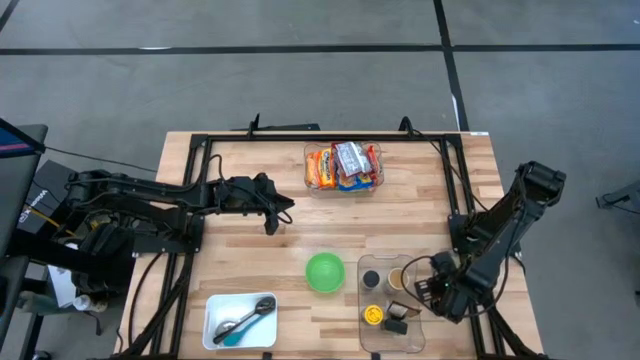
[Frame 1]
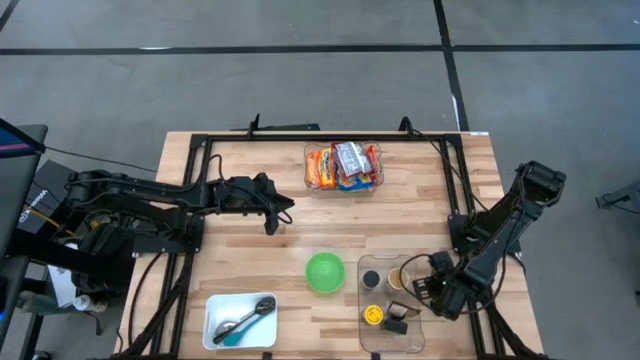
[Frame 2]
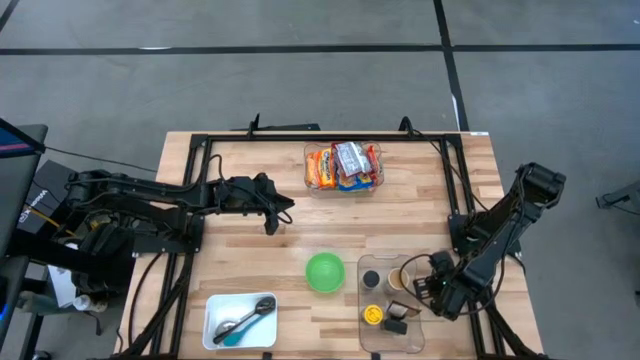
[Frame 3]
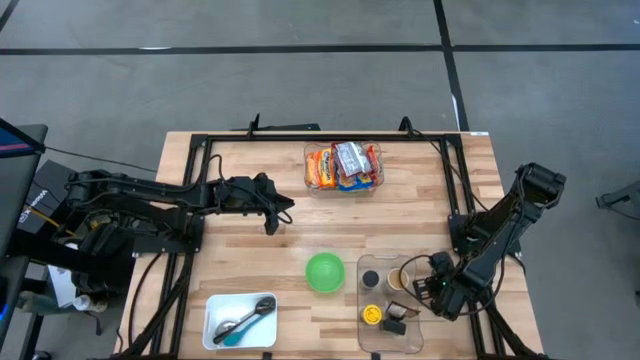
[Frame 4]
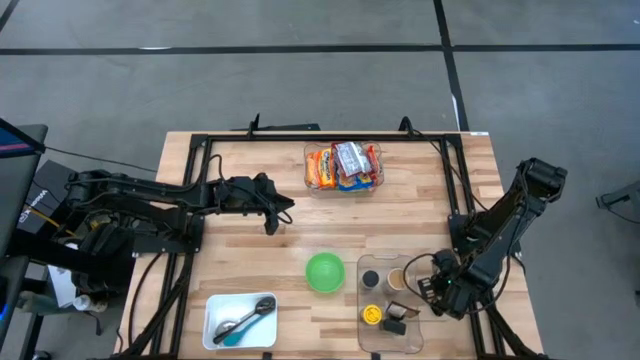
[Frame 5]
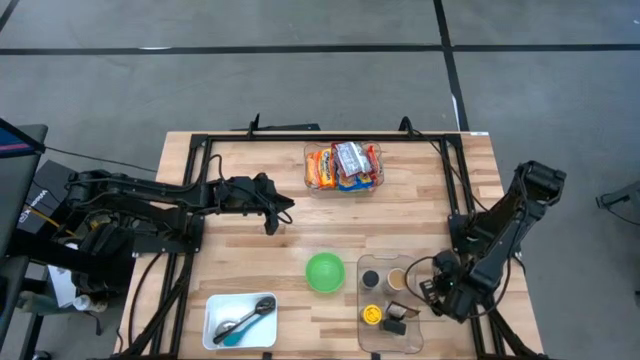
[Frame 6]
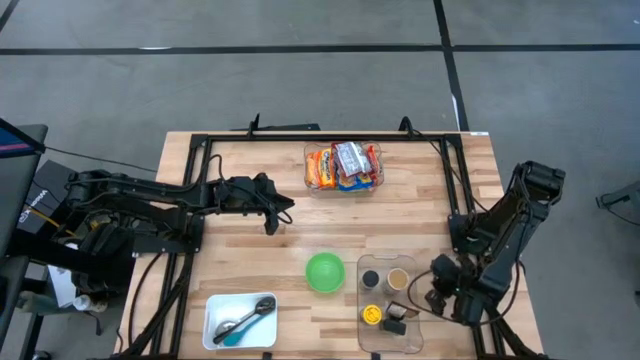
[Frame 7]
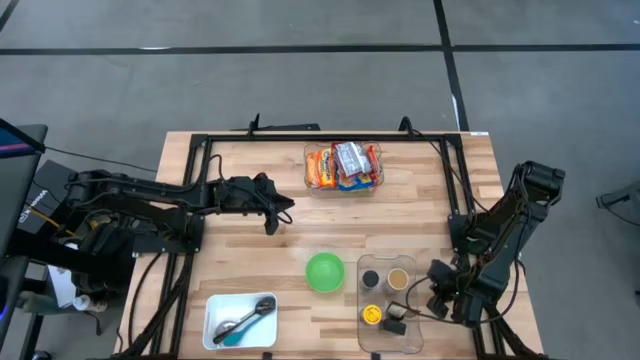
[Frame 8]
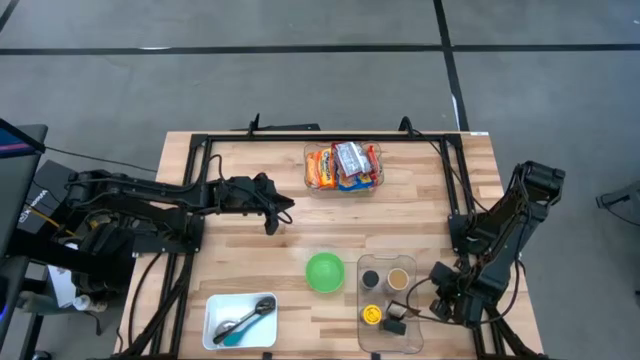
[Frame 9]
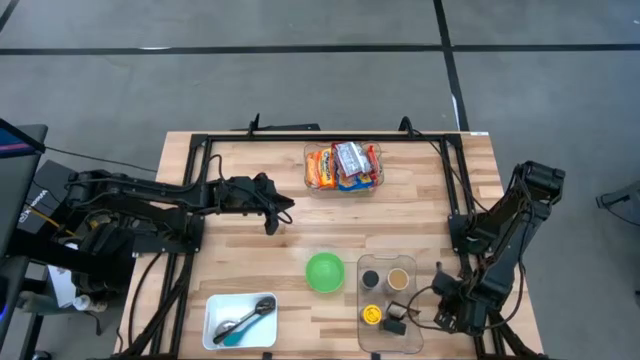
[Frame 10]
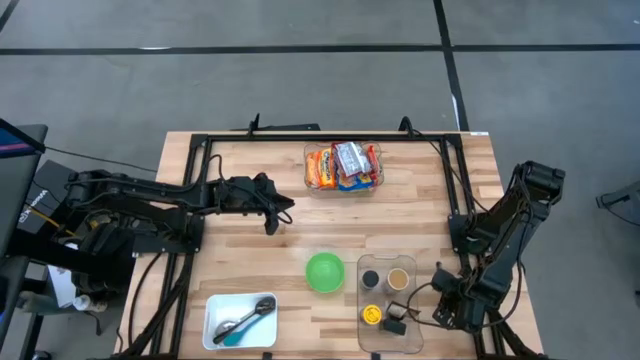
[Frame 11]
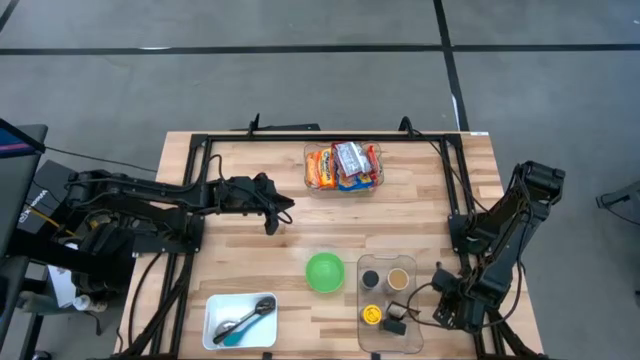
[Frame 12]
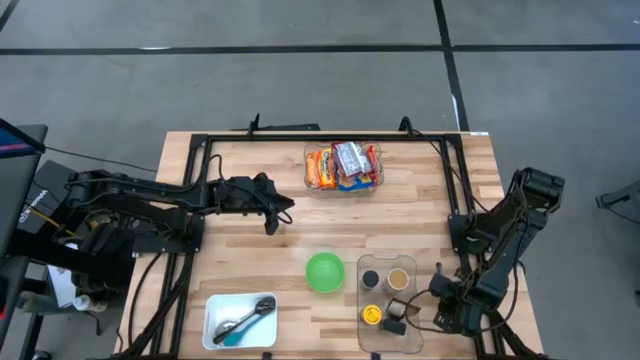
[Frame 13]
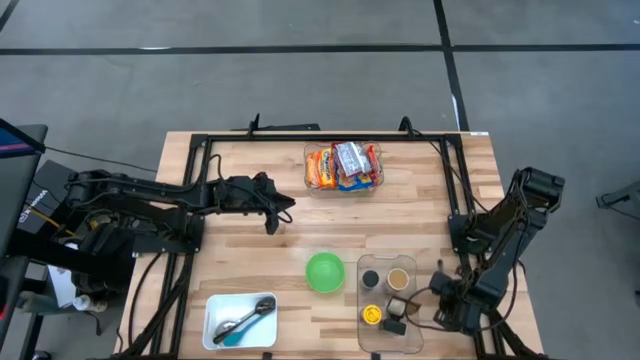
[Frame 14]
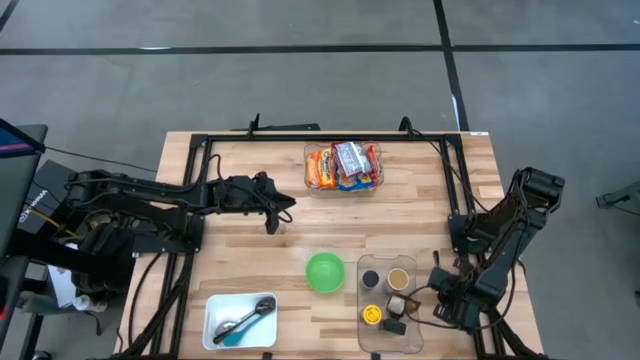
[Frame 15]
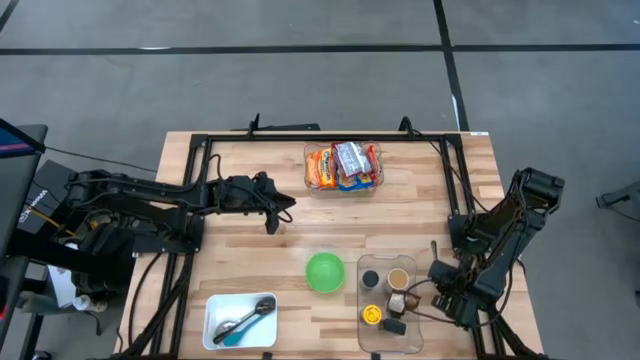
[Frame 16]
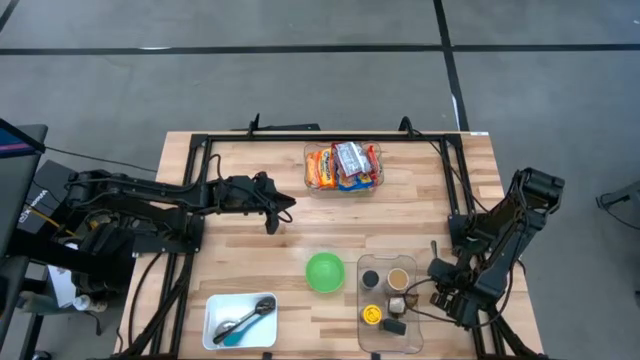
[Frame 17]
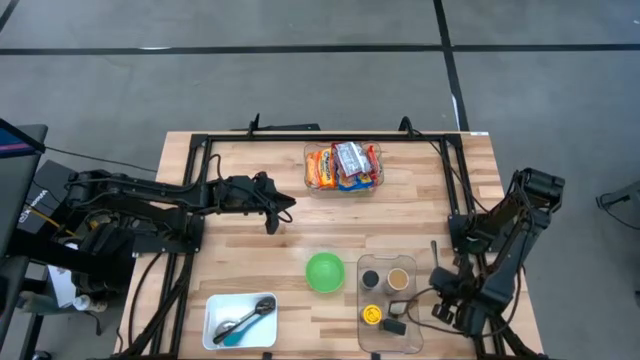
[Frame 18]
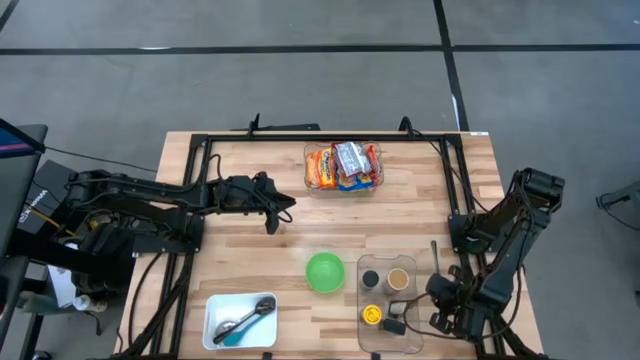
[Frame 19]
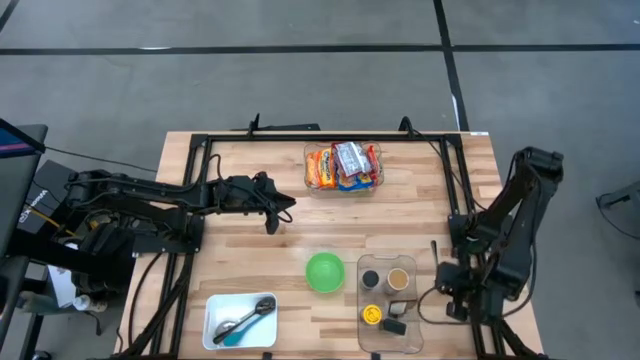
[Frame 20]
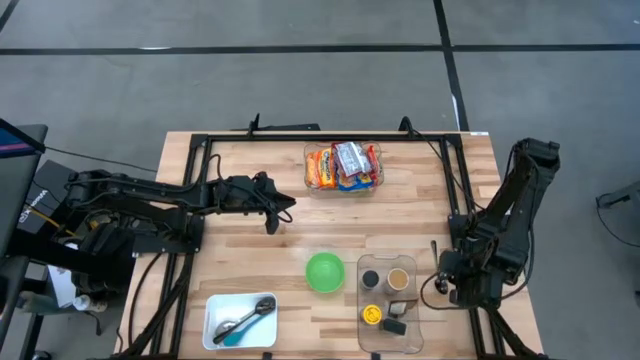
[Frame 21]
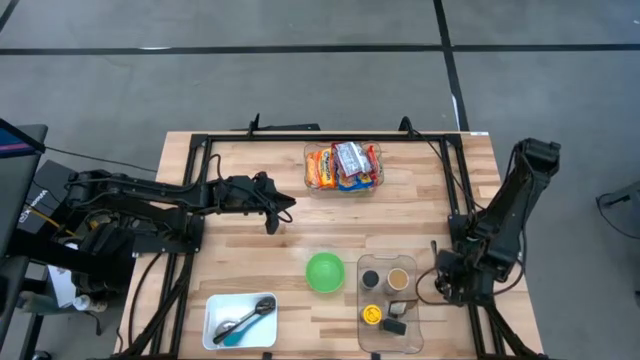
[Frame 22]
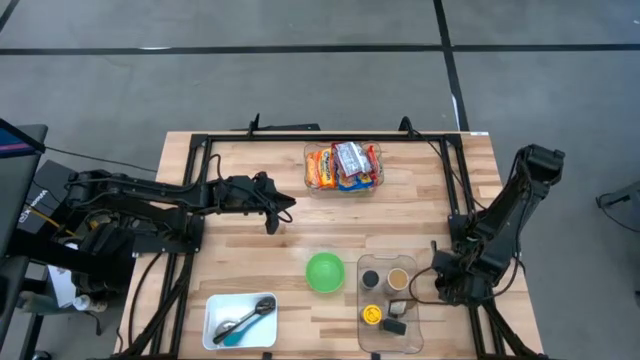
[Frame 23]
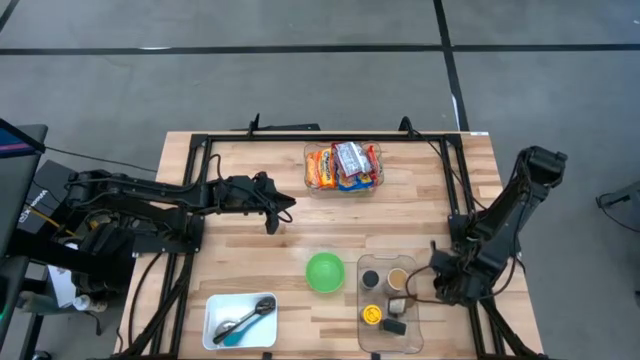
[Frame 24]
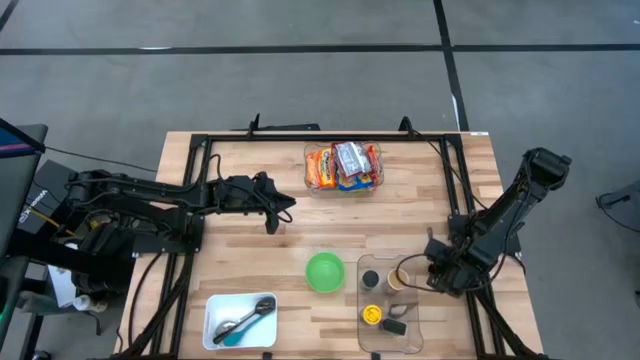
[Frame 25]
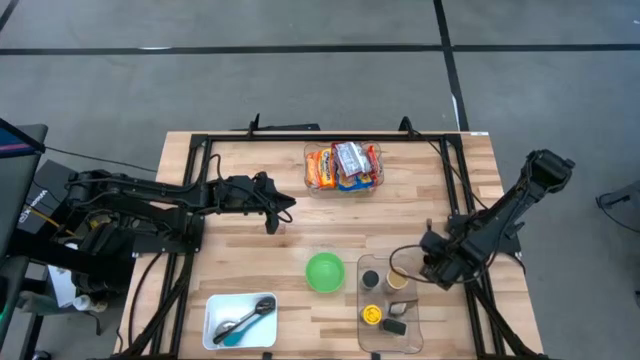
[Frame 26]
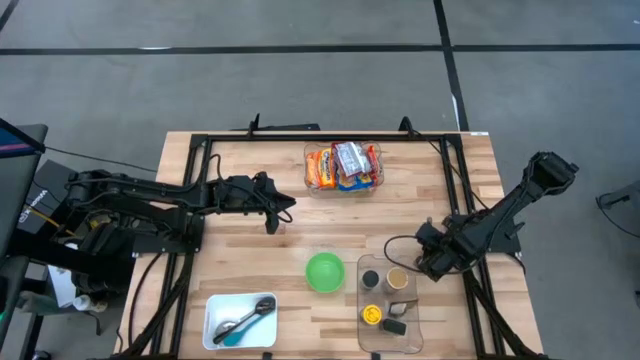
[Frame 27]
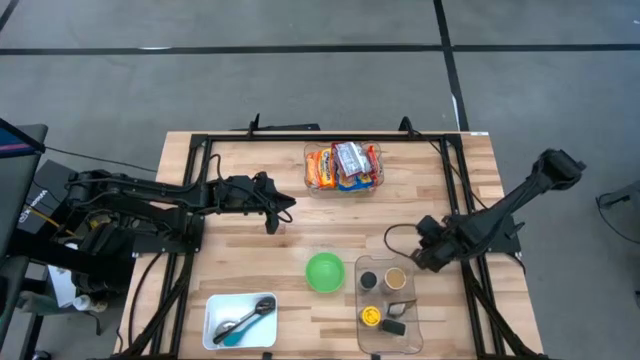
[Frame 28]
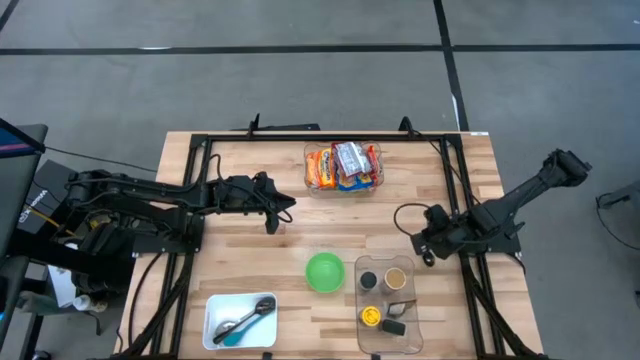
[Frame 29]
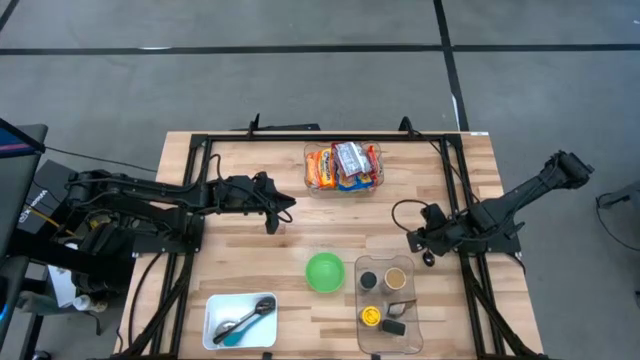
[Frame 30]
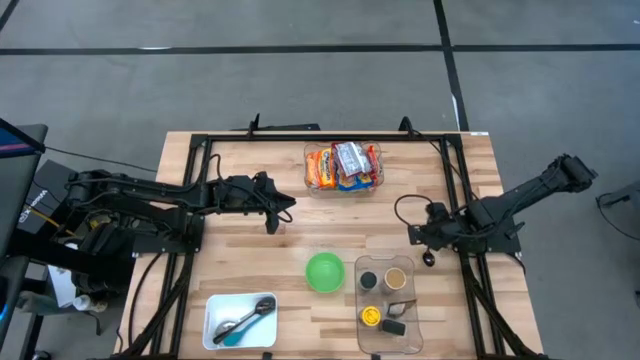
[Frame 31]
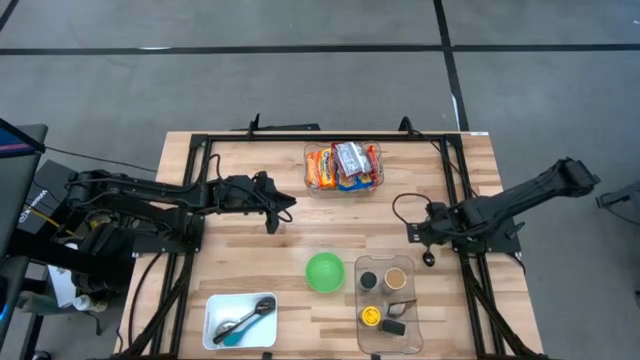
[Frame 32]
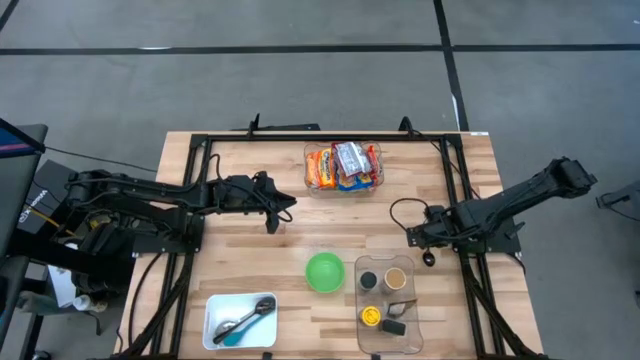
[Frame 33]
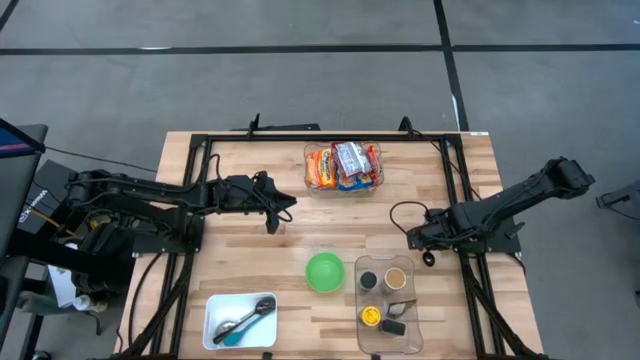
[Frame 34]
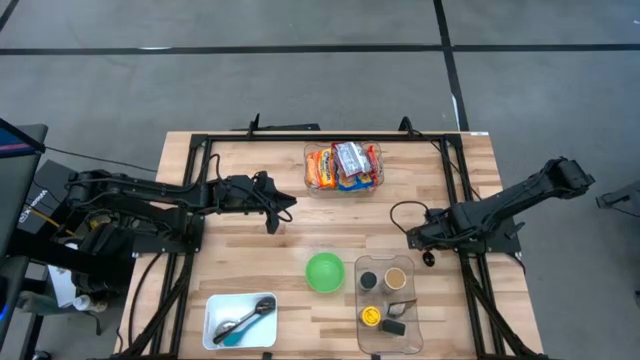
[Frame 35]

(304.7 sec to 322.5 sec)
Task: Pick & Place Food Item
Put the black spoon into the white bin

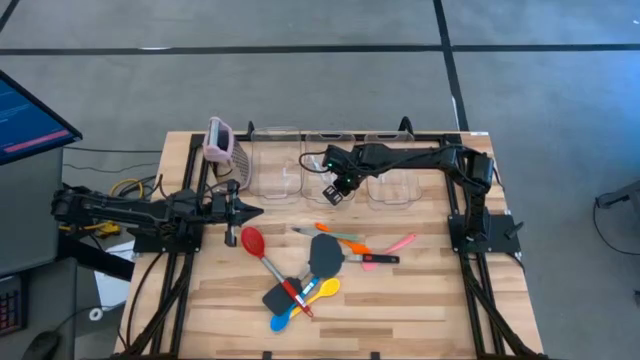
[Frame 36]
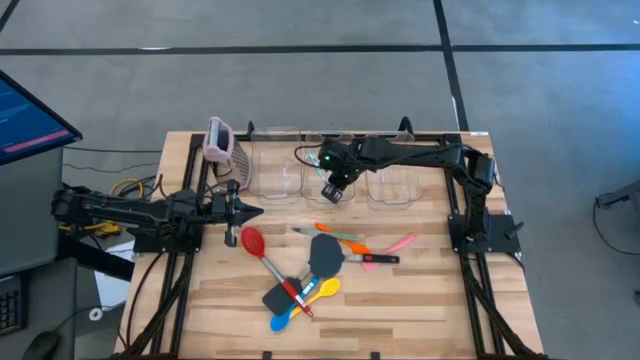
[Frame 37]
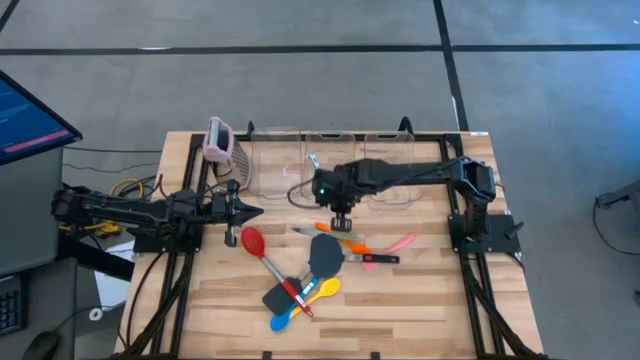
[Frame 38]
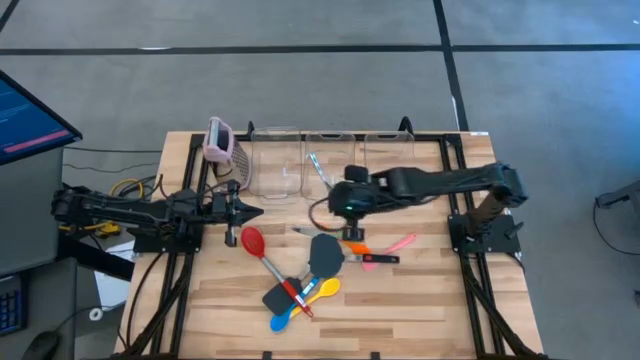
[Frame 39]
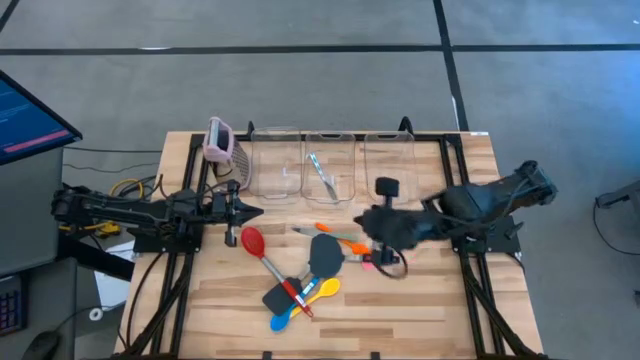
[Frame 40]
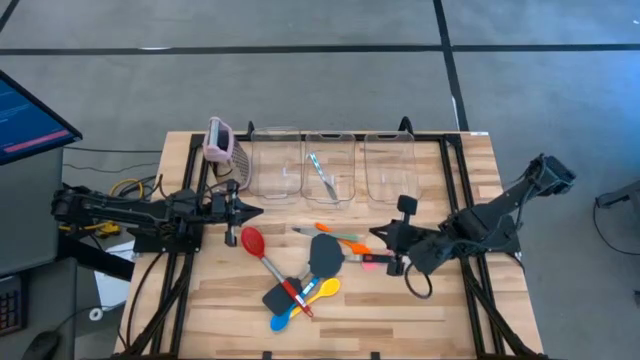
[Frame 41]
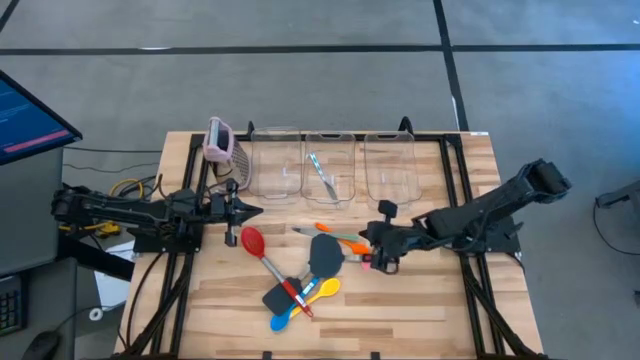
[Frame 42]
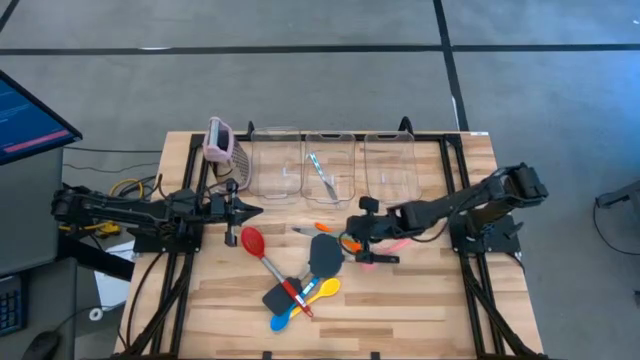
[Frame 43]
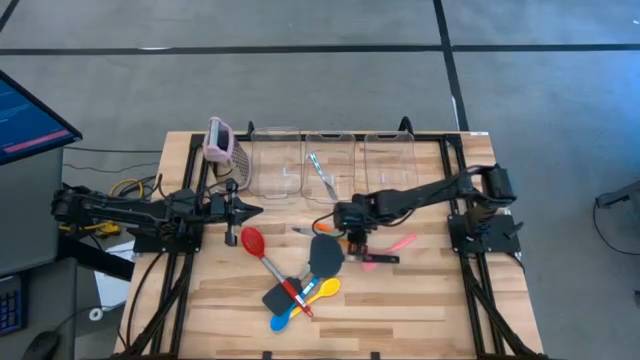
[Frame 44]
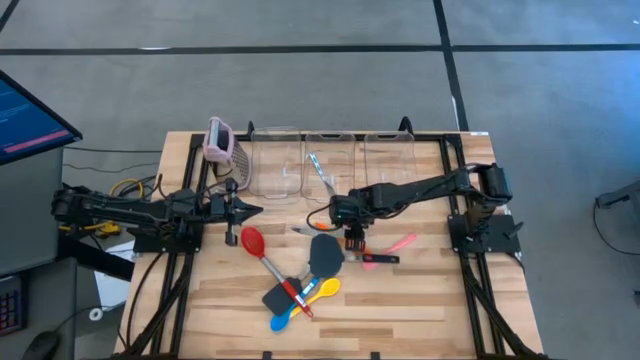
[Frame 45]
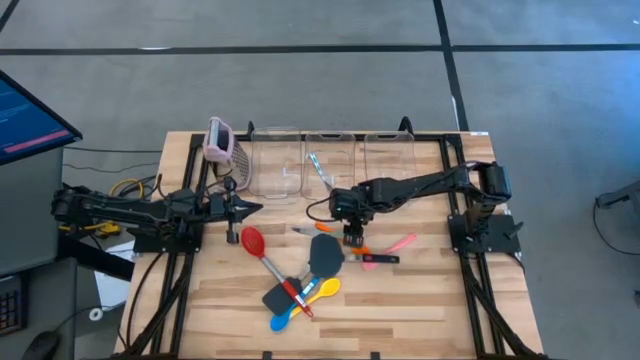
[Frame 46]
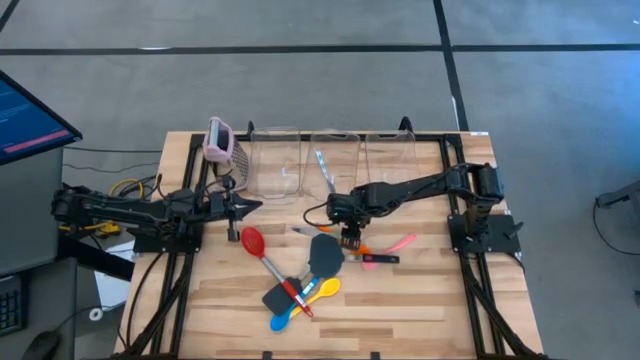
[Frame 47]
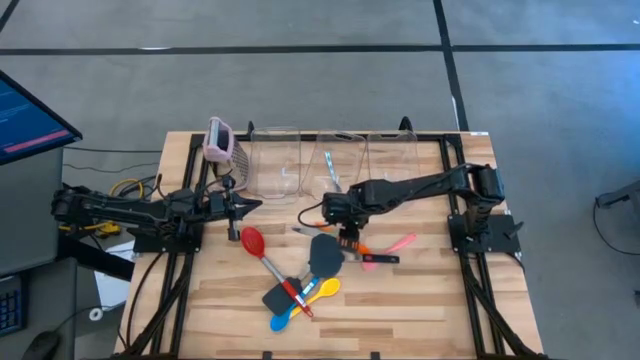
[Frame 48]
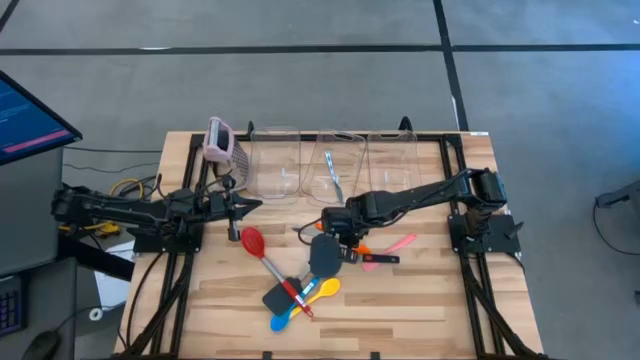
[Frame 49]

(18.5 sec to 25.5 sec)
Task: Pick & Place Kitchen Items
Put the green table knife into the middle transparent bin
